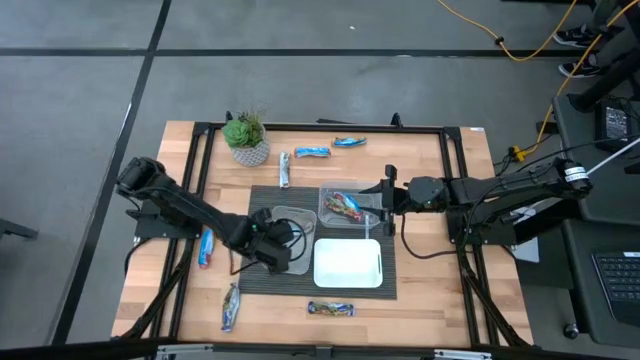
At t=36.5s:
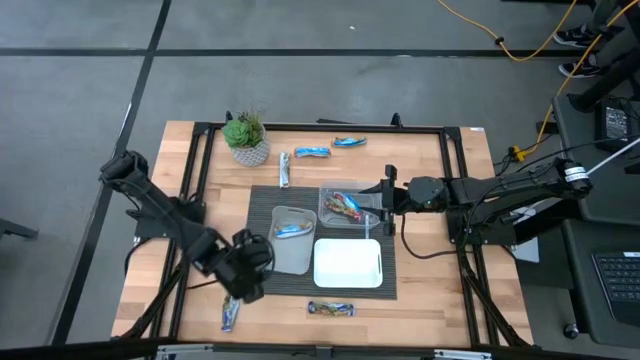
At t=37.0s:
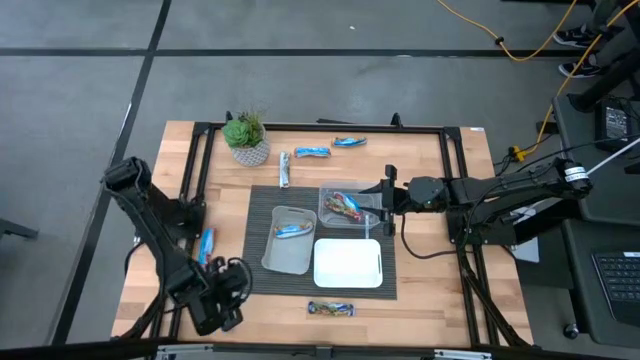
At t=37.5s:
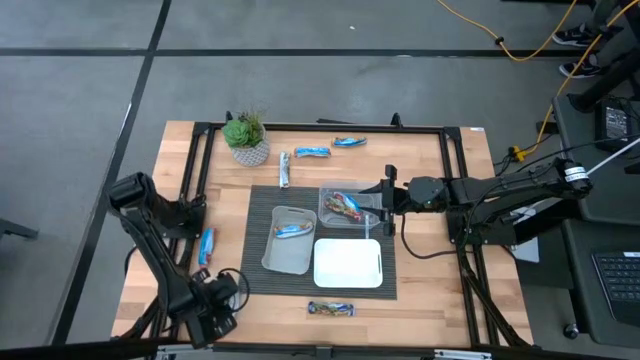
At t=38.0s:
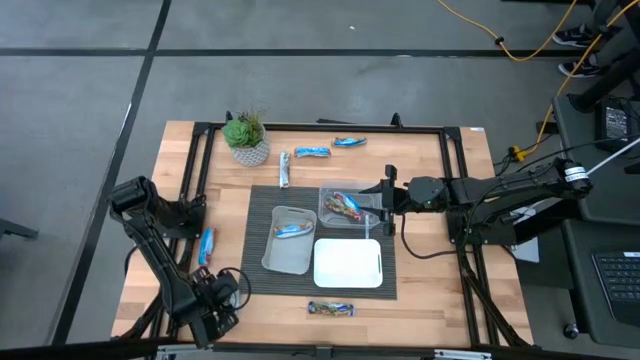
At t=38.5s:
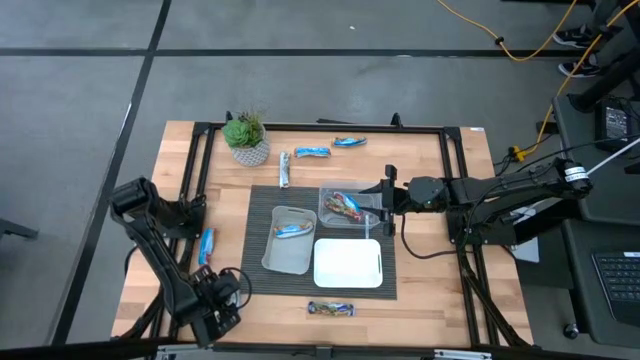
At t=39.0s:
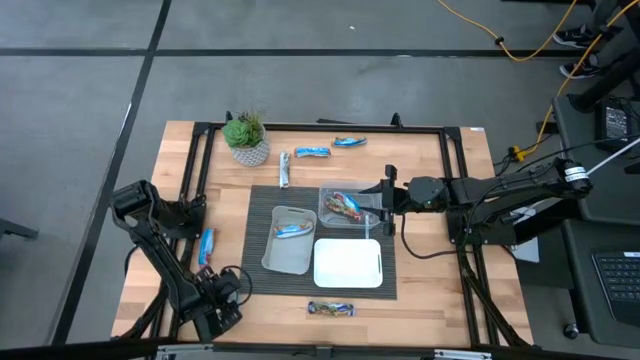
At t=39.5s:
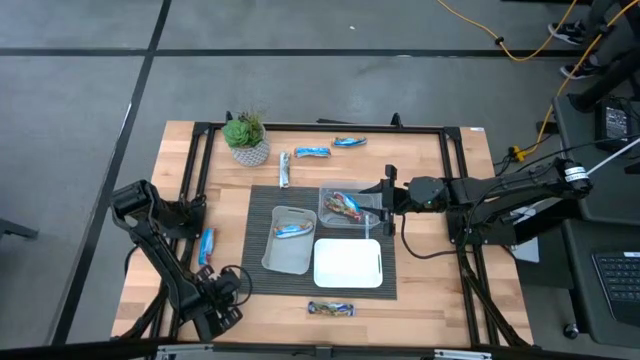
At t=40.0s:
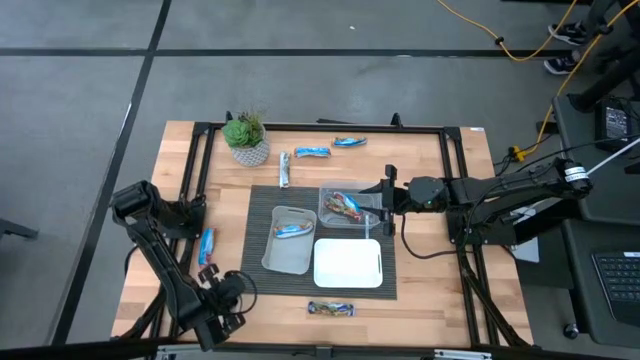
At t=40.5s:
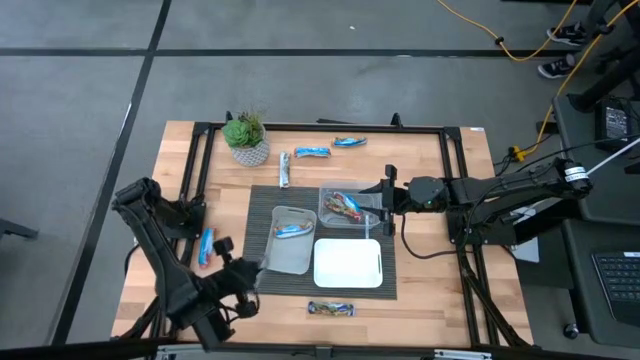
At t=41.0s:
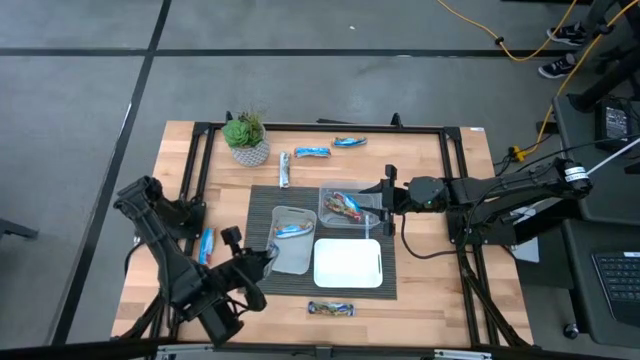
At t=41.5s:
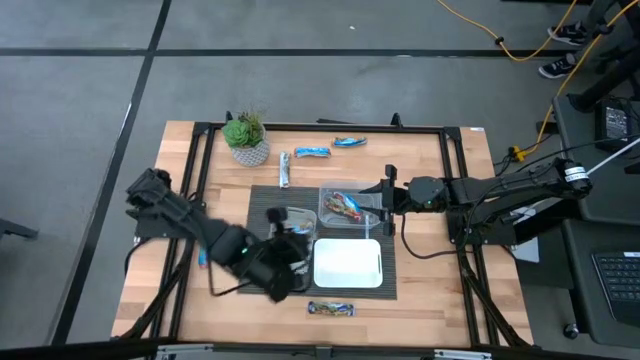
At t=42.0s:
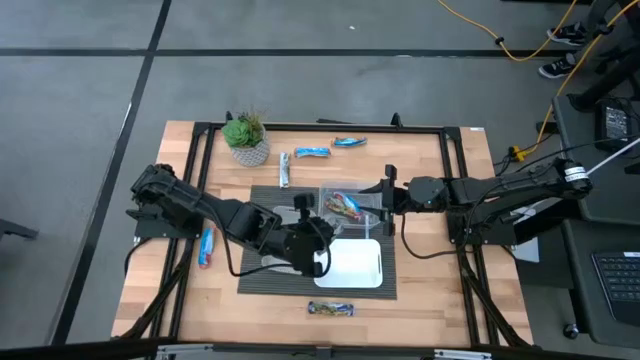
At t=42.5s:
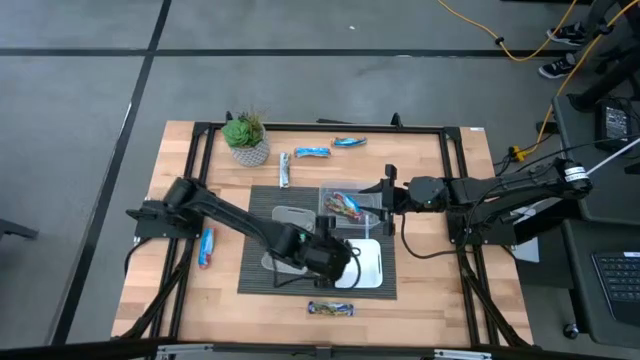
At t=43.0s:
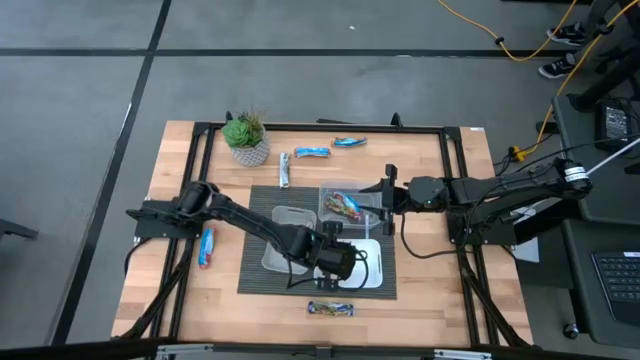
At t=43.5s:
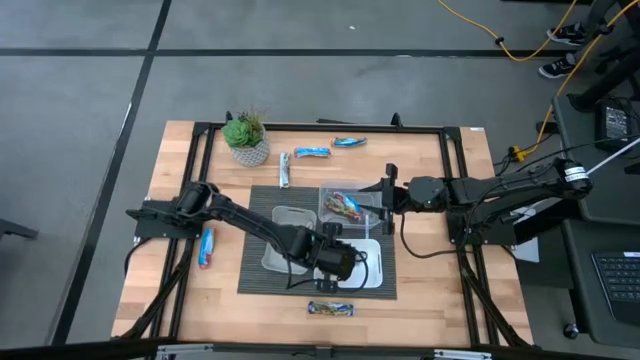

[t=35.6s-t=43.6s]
Task: Pick and place Granola Bars by type
Put the blue granola bar into the white bin

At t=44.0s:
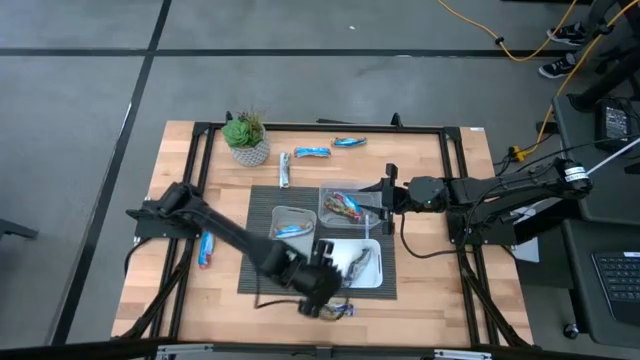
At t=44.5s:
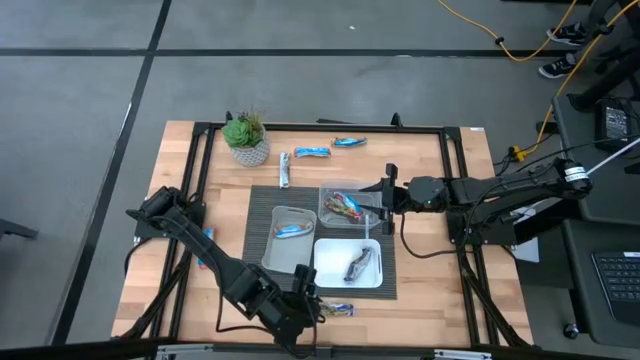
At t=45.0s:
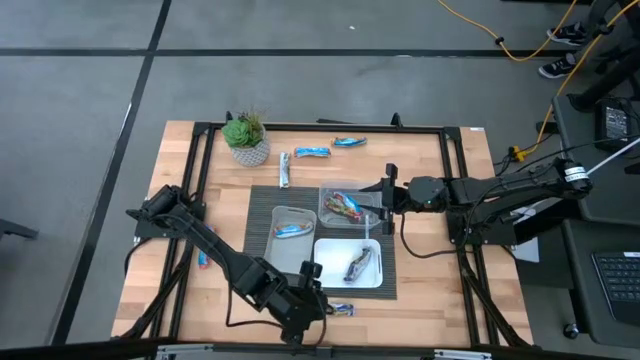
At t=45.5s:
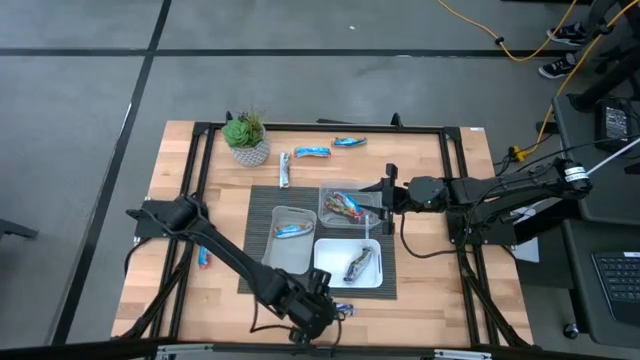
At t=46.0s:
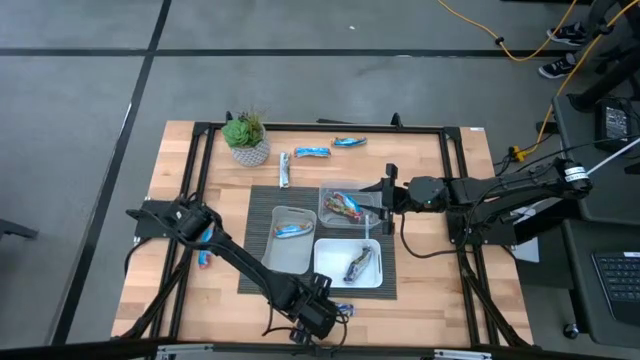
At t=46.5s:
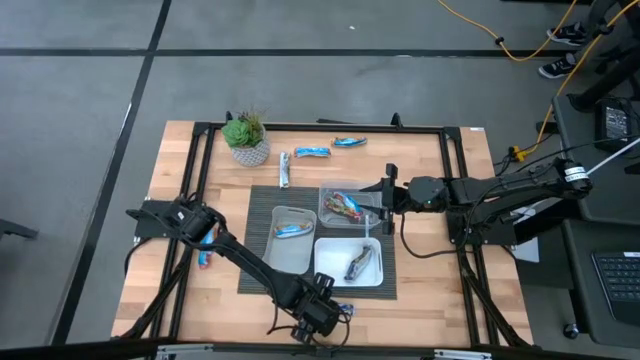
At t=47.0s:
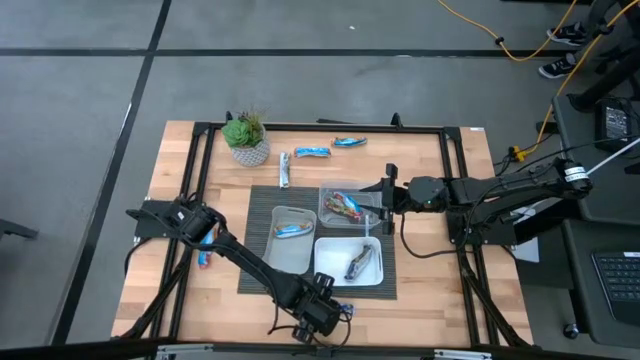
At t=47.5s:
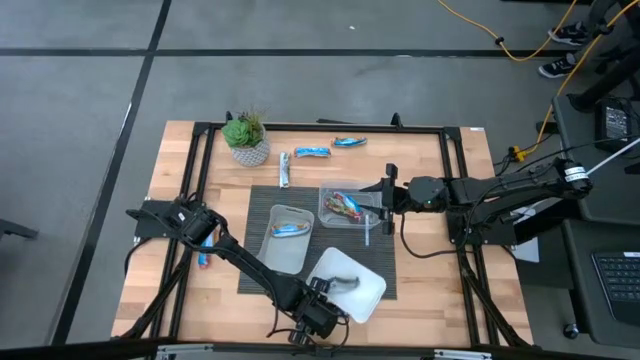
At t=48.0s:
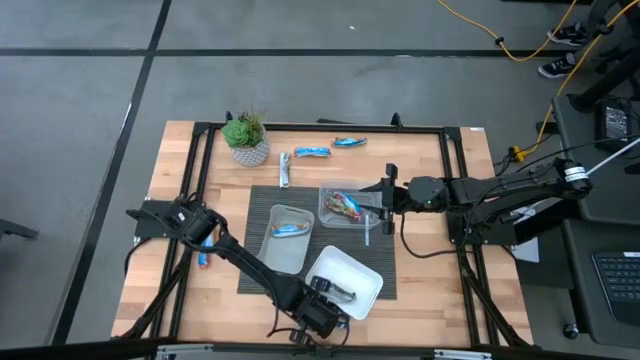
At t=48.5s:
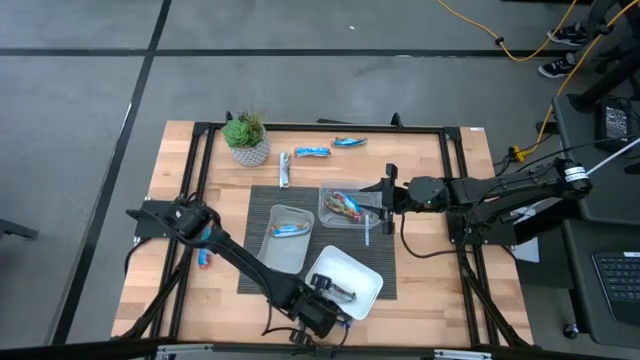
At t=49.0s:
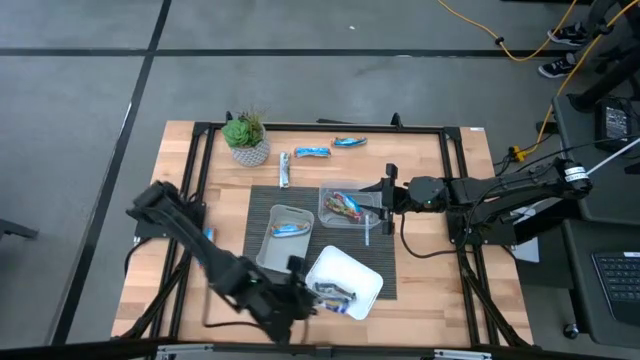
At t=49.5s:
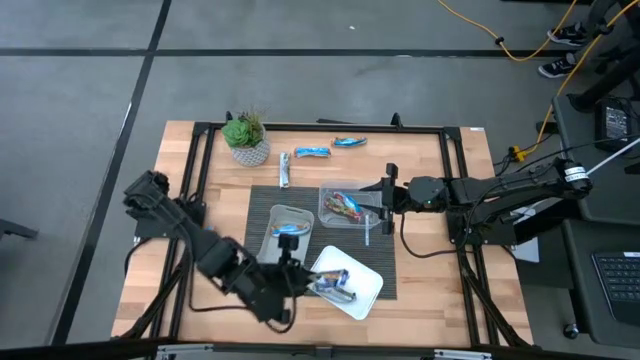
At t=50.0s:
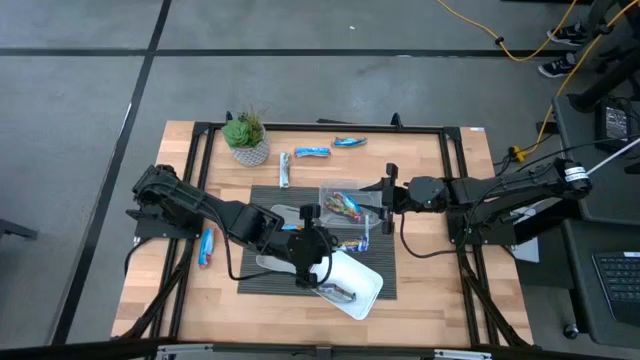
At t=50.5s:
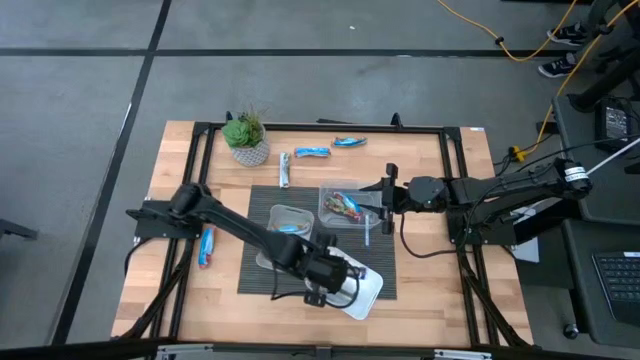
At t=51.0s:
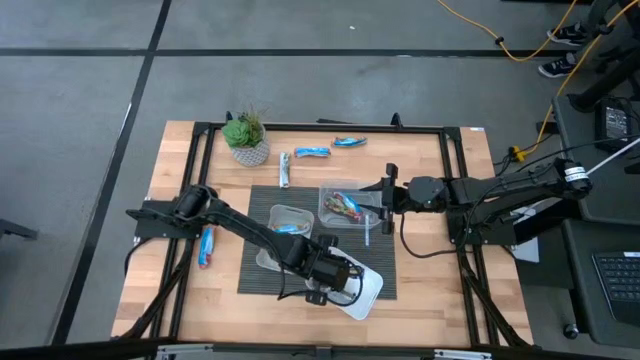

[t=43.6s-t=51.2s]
Put the blue granola bar into the white bin

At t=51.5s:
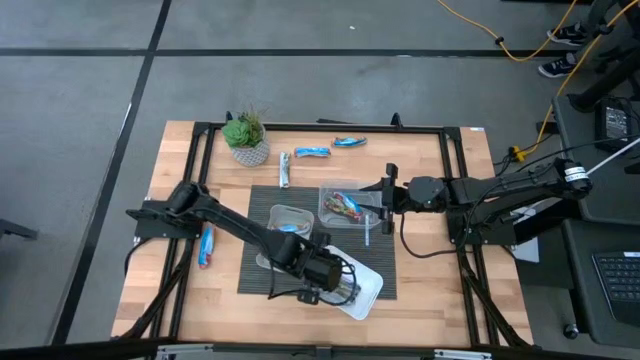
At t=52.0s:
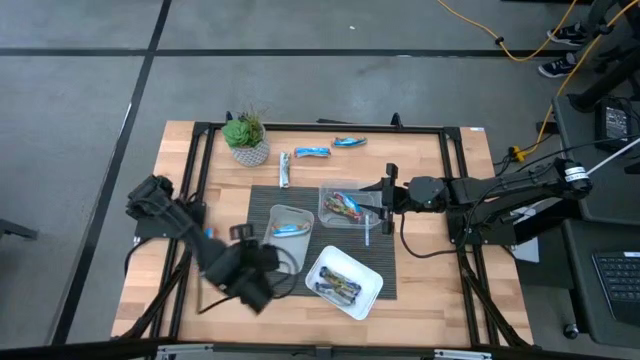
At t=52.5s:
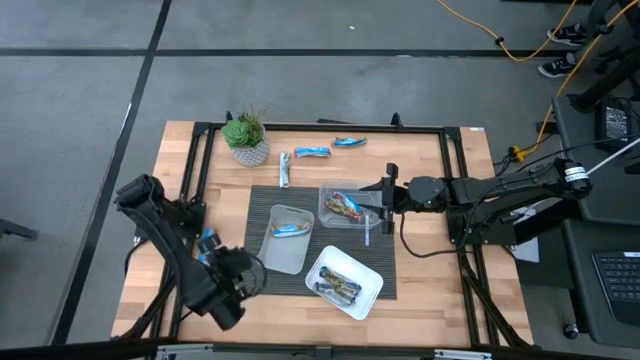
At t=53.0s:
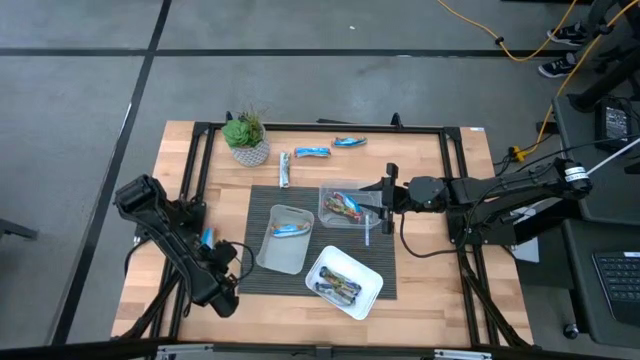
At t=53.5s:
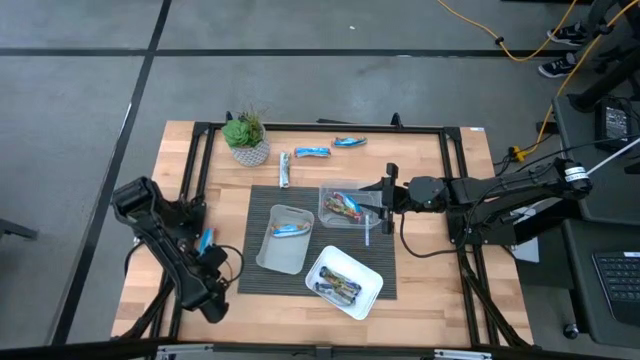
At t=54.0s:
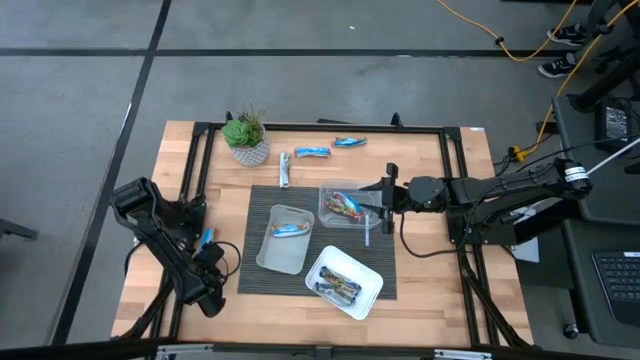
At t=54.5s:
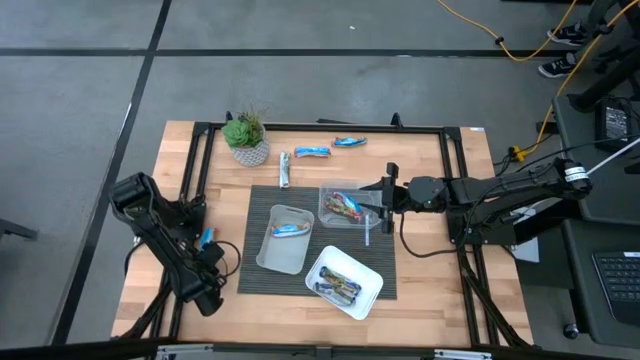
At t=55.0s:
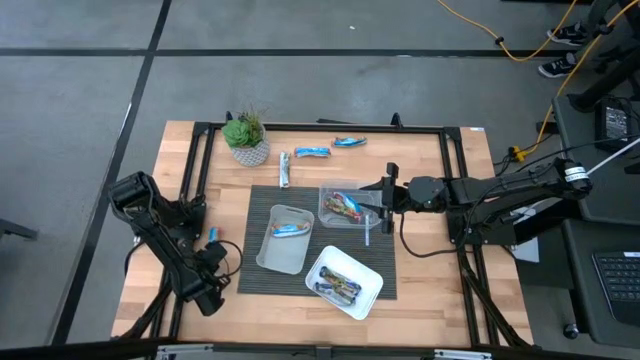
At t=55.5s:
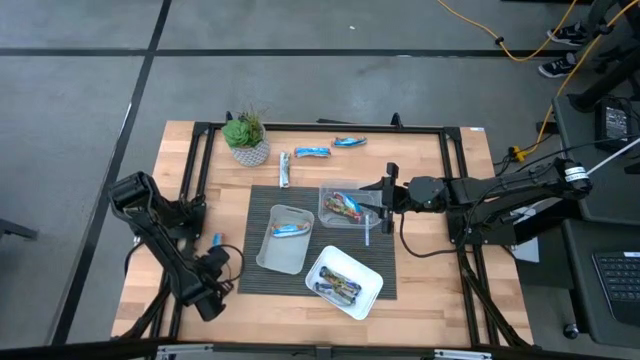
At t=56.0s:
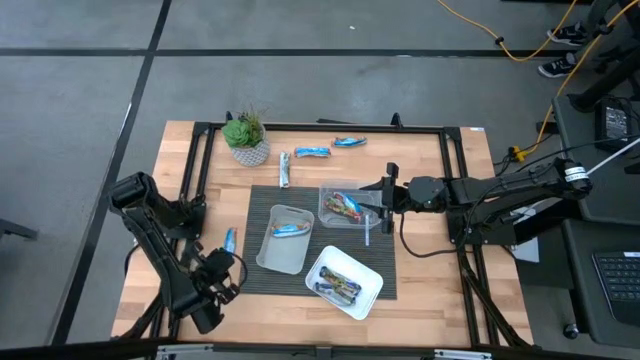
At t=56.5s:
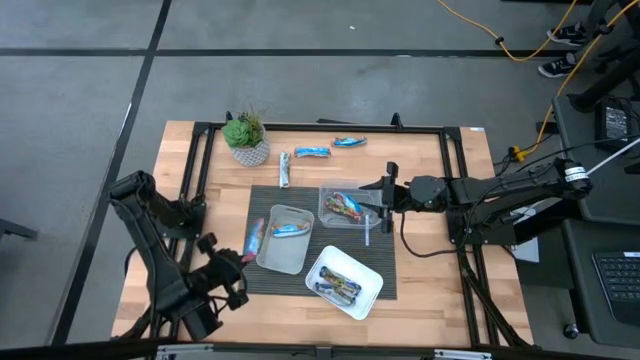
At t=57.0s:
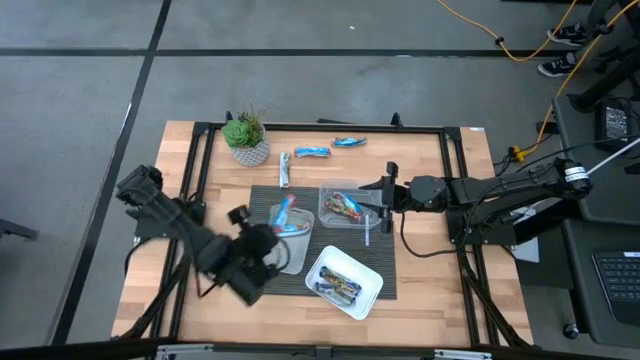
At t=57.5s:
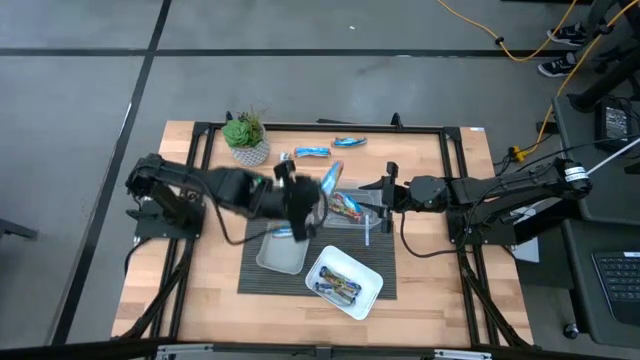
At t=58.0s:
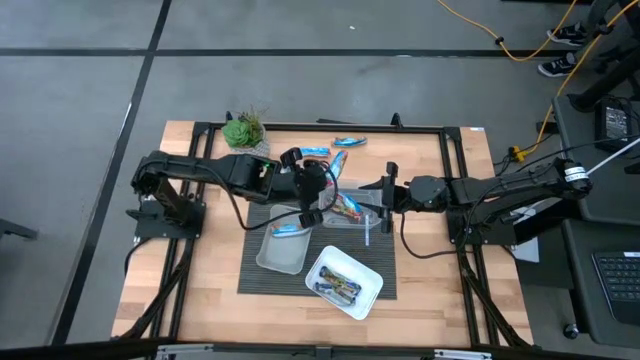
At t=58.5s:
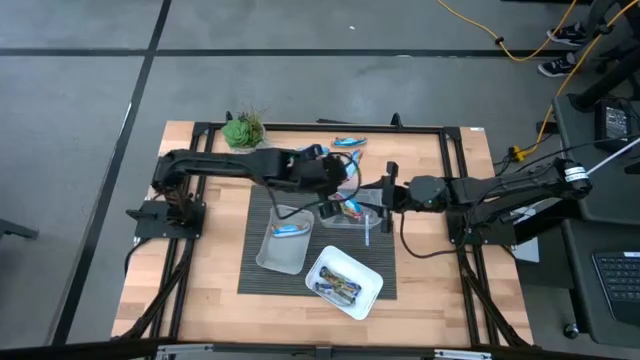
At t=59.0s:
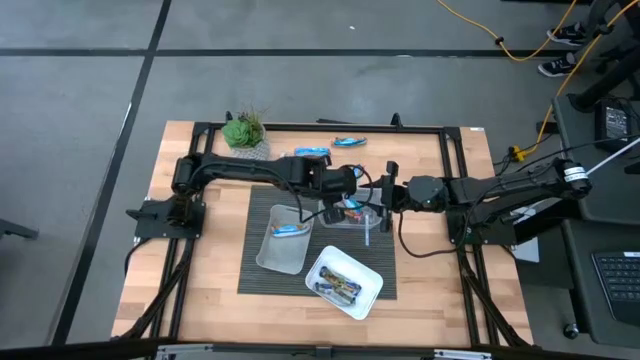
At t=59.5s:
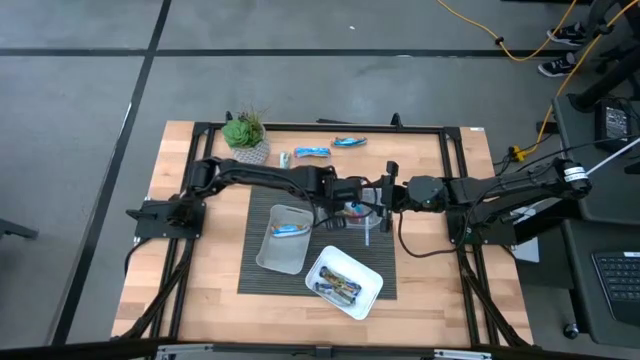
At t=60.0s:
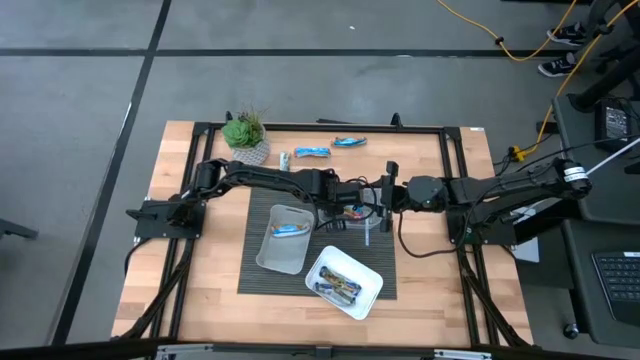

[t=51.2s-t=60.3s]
Put the red granola bar into the transparent bin
